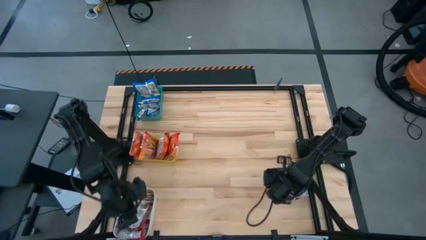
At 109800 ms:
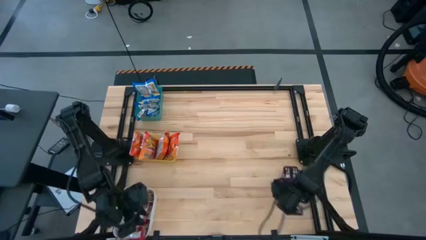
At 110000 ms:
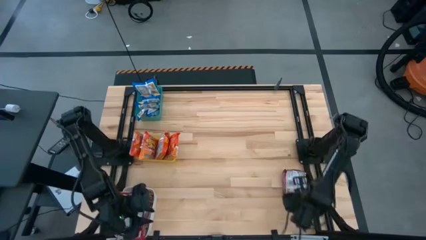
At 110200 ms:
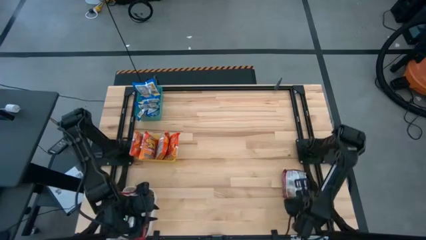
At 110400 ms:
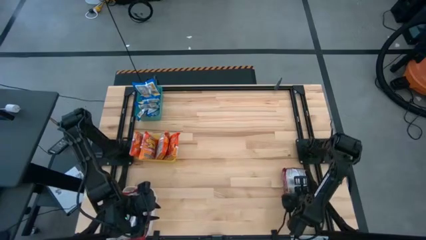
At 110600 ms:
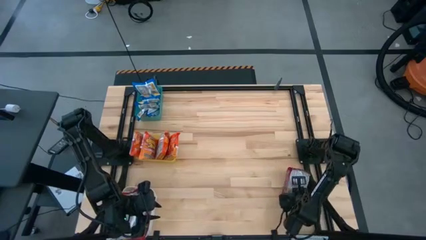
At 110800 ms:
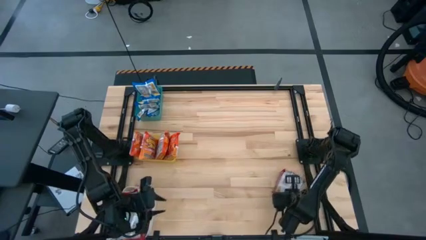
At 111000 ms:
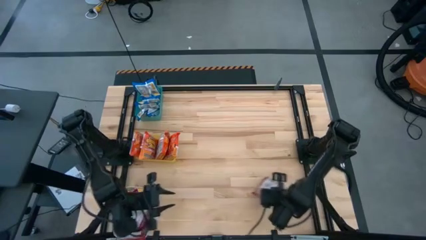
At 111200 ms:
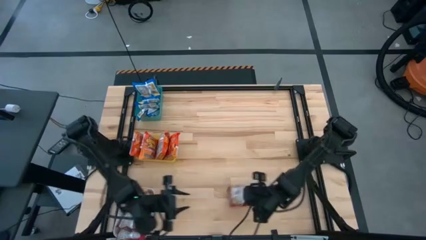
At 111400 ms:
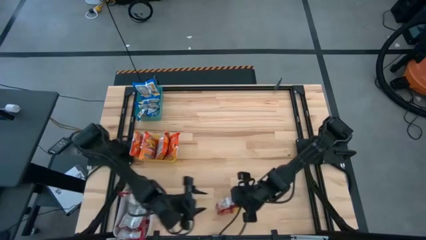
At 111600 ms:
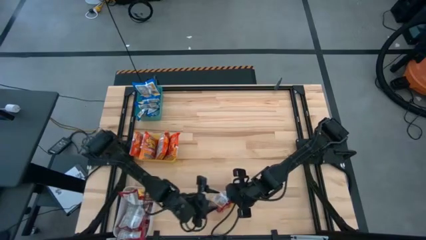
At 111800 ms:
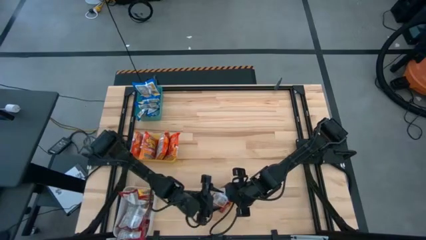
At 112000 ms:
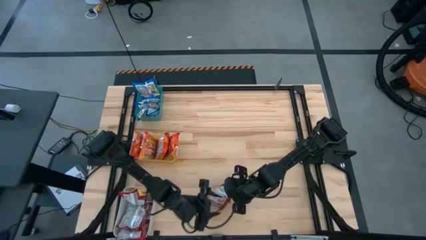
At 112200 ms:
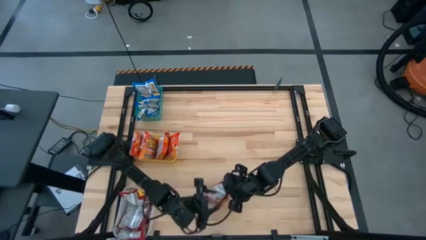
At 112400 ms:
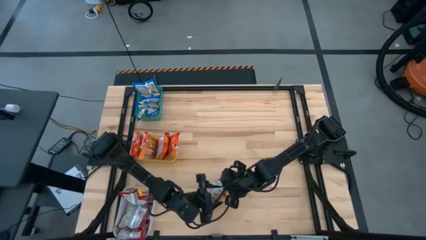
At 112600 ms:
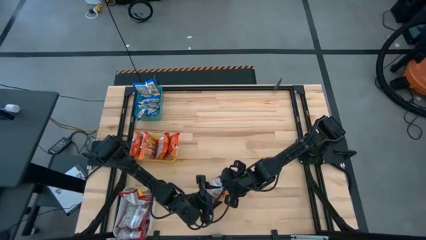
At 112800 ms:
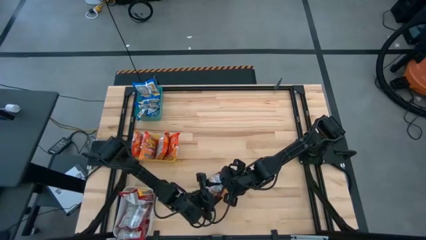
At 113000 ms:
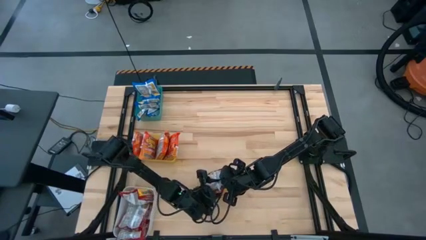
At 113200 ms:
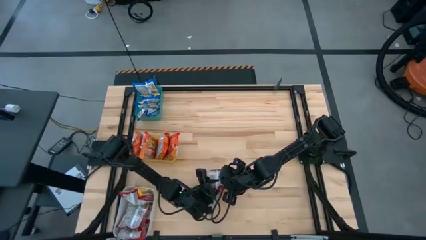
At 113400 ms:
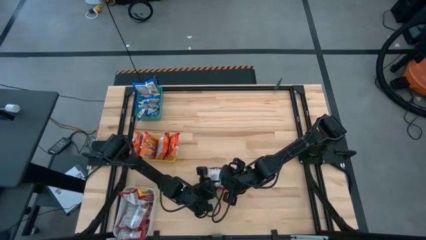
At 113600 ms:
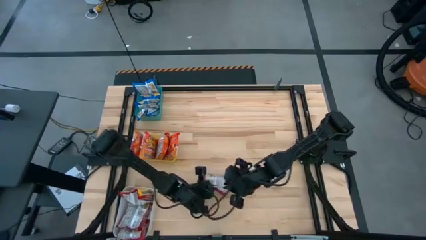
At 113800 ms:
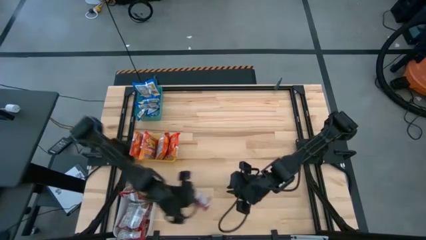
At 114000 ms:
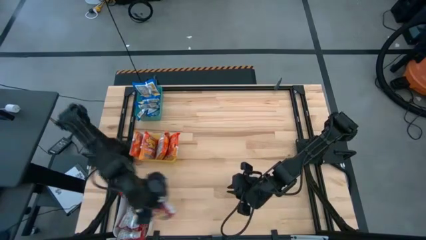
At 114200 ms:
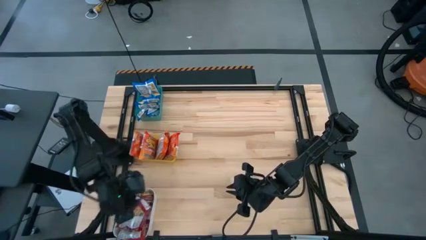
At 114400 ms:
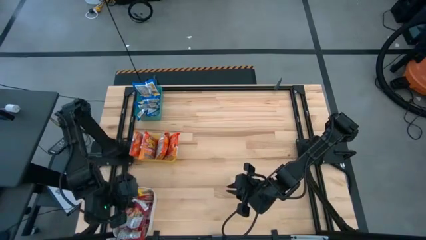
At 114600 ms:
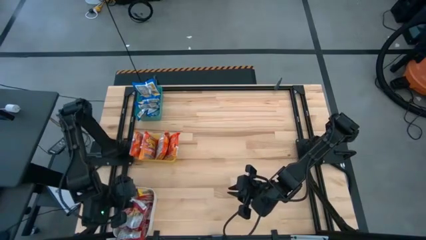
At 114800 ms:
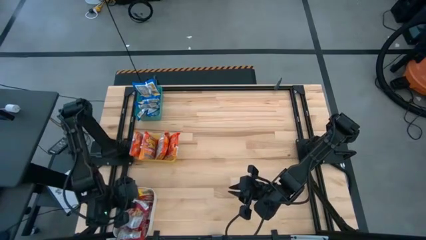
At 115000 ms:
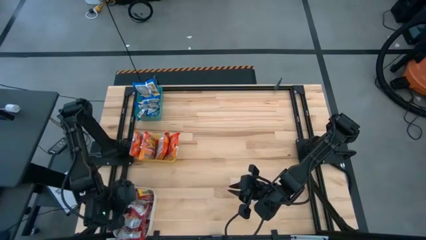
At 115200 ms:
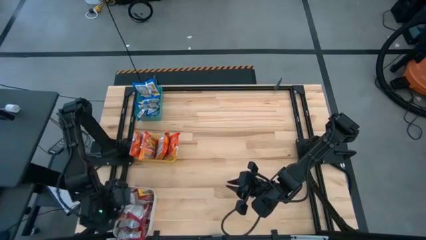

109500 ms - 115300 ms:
Task: Sort Maruchan noodles
Put the red noodle pack into the white bin

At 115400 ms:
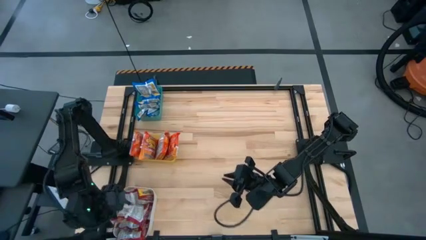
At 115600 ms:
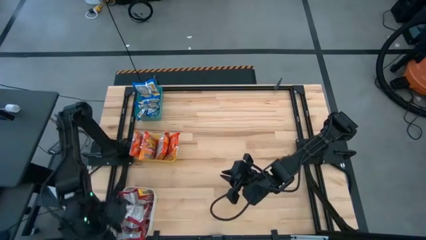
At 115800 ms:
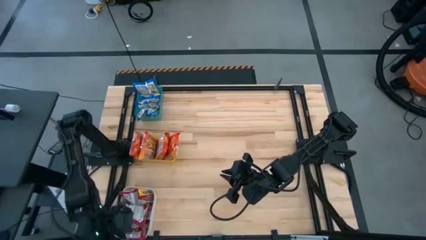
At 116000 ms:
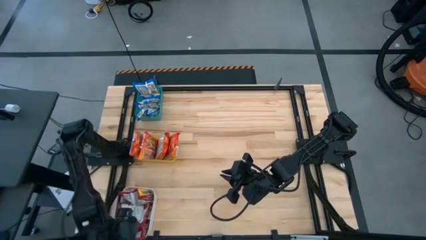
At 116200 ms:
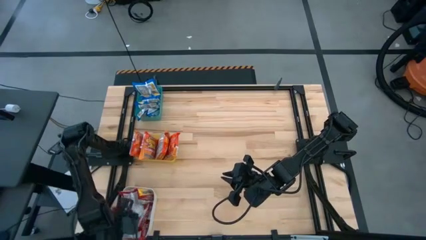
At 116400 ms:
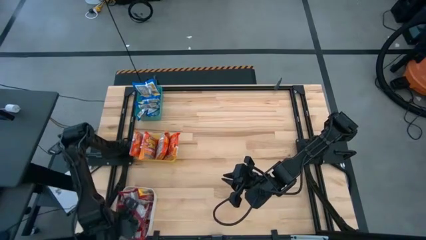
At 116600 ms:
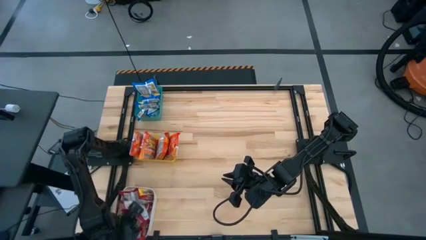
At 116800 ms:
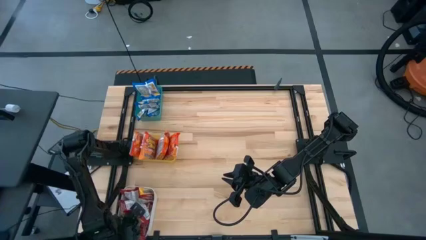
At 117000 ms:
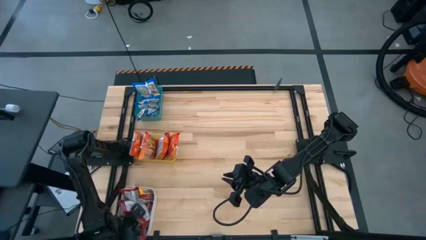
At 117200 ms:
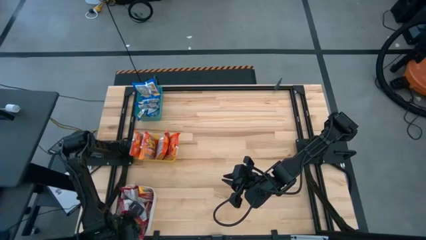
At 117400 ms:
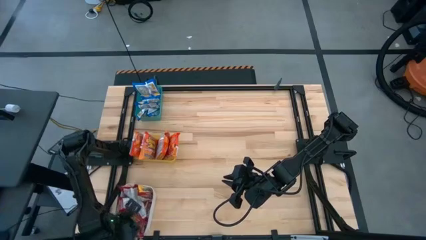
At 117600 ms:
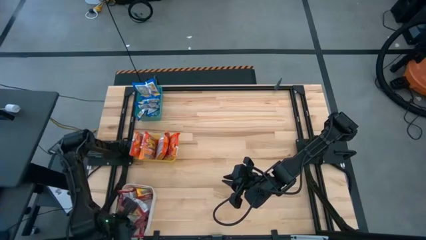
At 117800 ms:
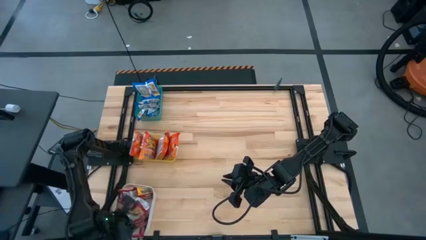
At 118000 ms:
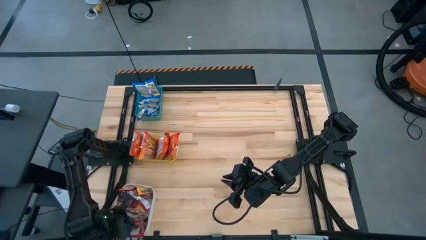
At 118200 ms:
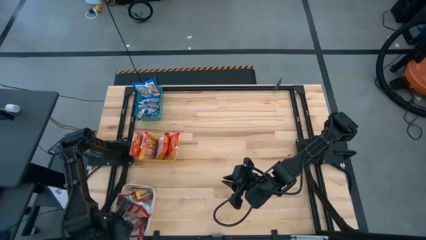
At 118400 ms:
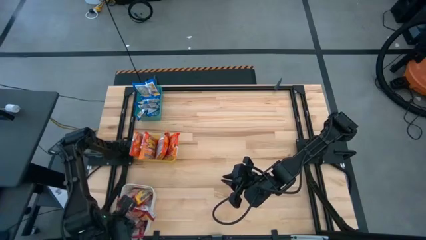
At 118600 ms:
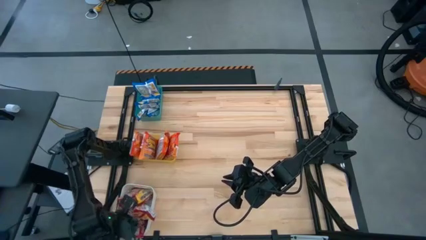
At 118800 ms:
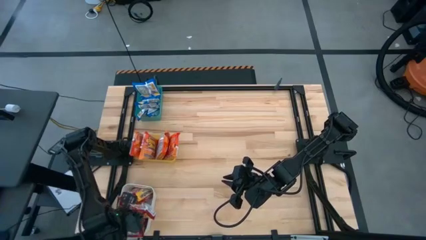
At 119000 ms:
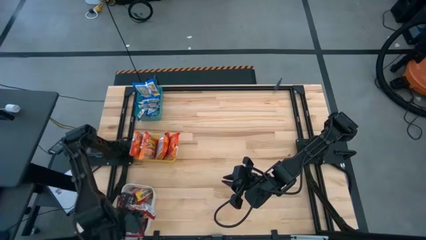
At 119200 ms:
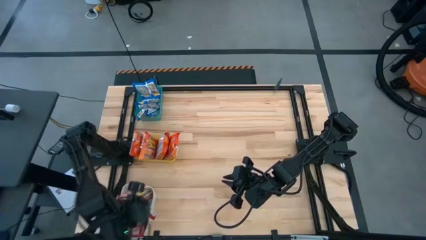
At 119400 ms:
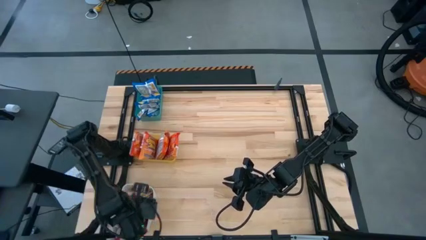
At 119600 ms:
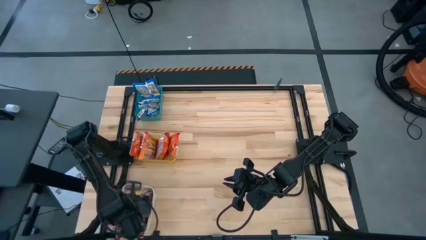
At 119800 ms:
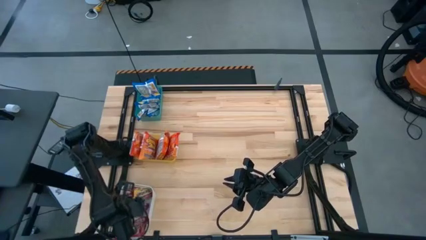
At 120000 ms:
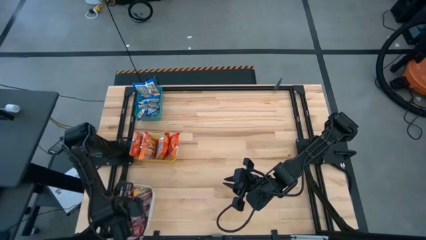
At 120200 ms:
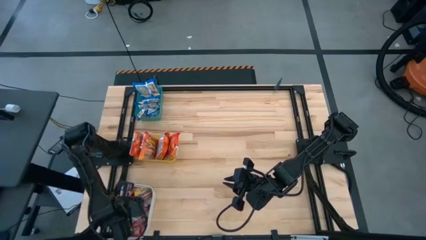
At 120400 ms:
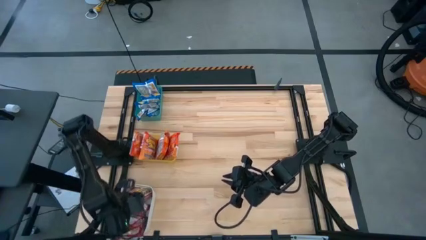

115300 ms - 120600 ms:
Adjust the red noodle packs

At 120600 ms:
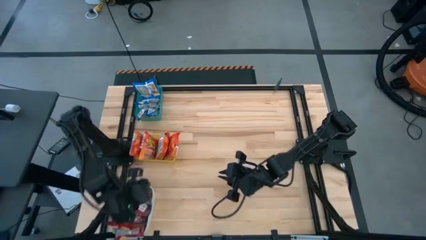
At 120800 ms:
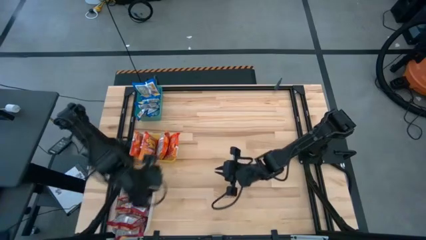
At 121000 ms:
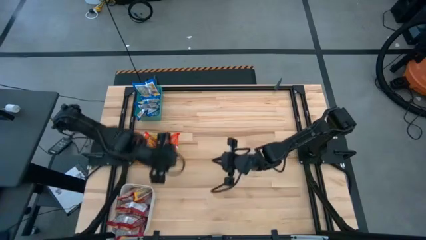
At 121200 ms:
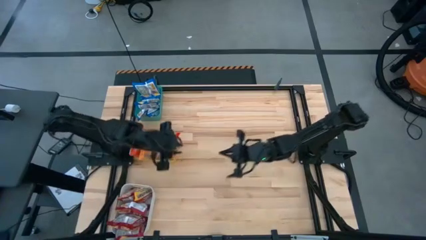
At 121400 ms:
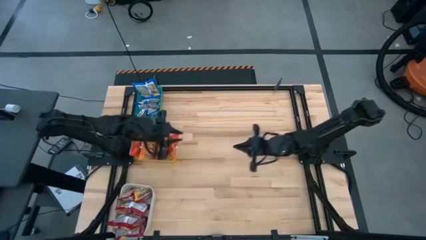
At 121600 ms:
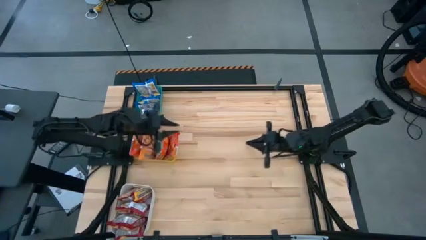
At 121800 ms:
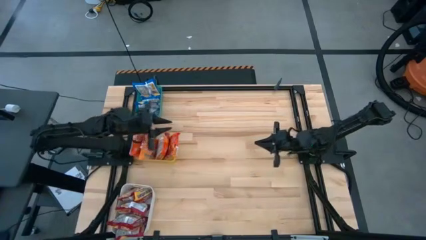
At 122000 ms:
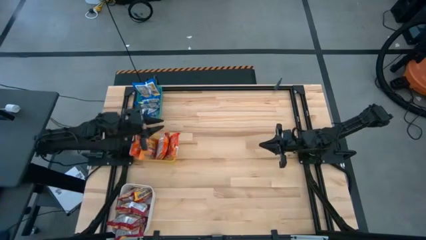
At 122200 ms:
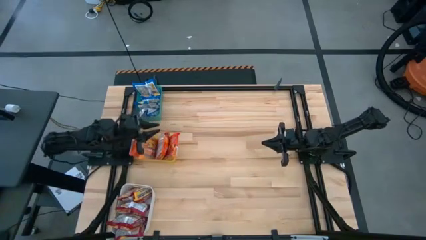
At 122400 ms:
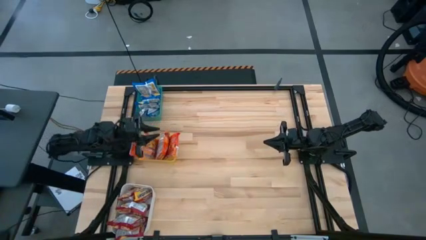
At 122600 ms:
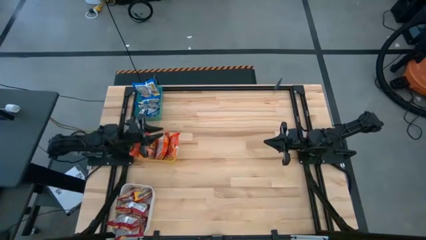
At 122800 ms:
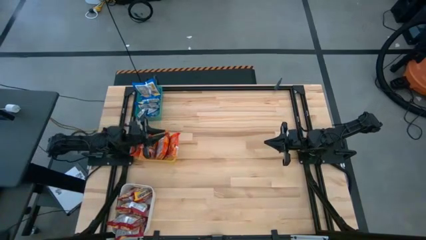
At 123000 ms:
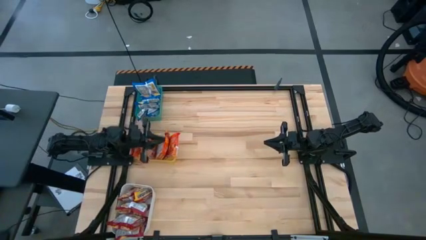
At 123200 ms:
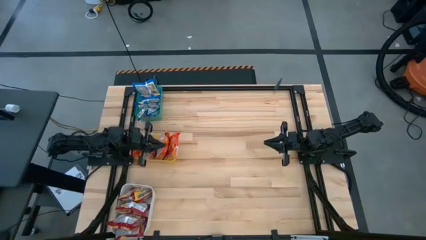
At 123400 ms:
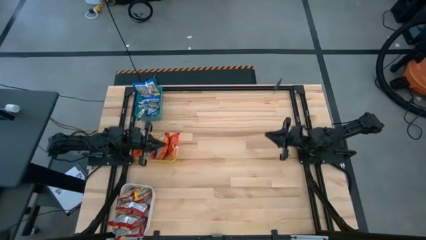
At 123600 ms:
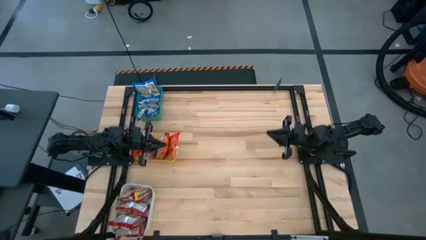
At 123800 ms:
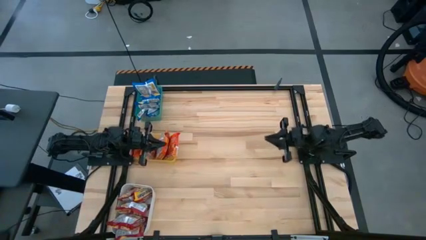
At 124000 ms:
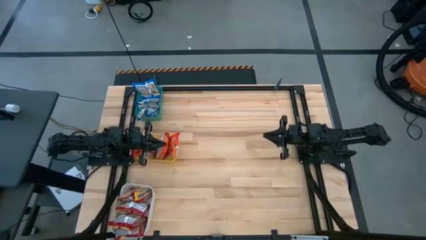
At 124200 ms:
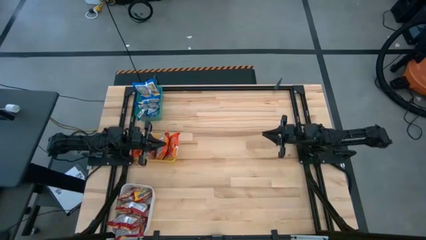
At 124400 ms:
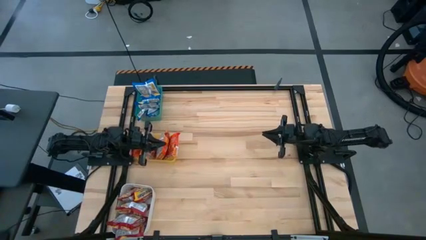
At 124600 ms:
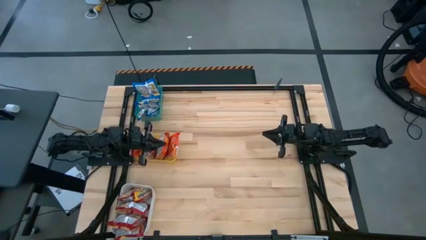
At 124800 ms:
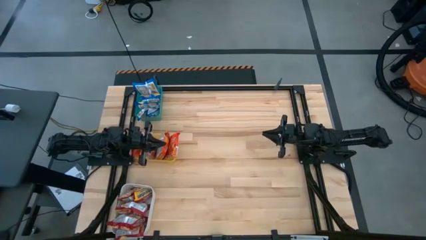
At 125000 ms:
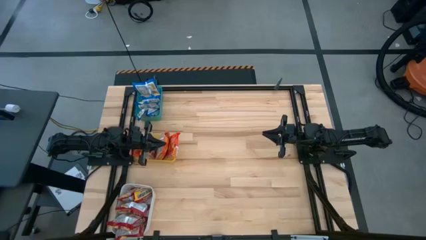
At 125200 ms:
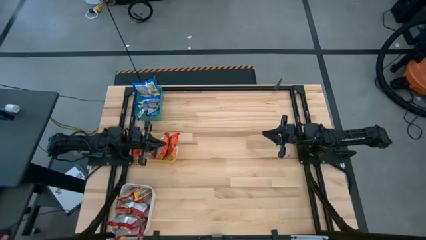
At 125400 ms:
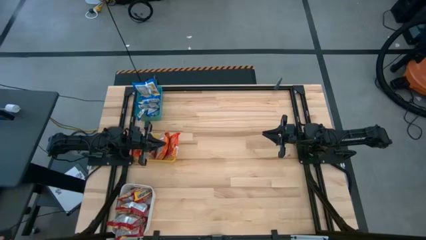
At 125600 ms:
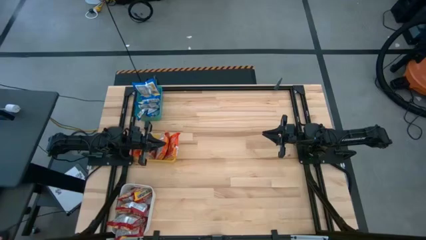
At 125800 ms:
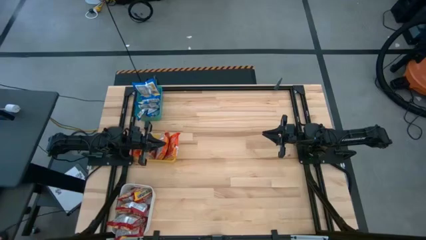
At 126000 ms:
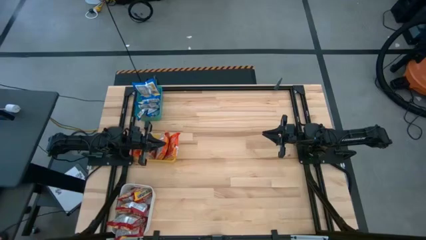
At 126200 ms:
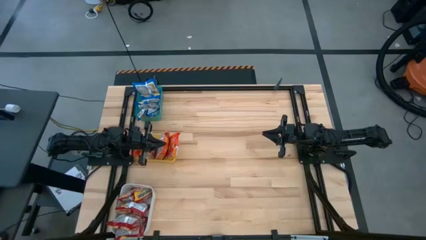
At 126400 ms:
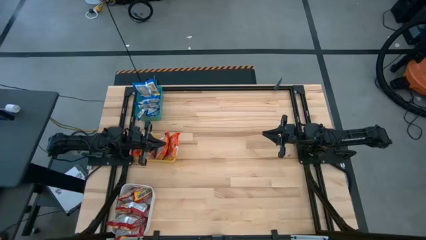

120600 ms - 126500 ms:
Return to Home Position
